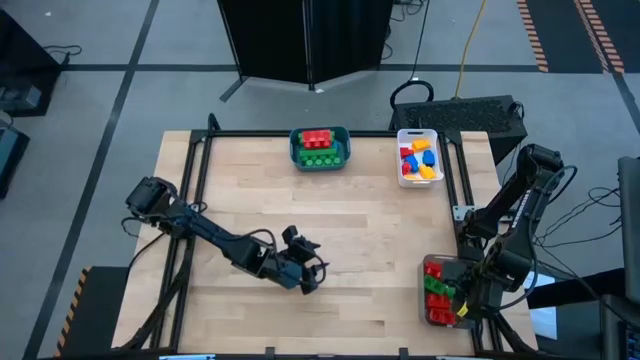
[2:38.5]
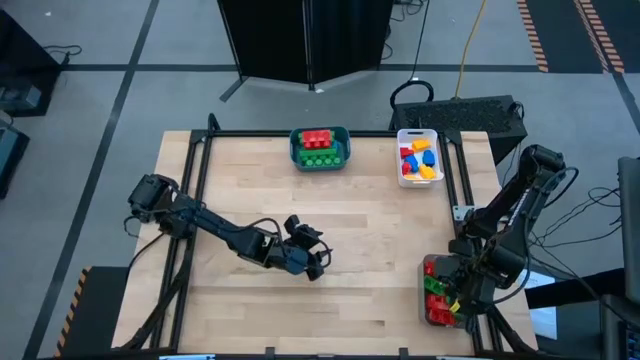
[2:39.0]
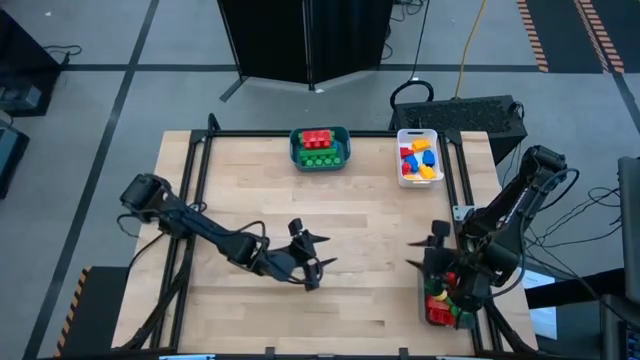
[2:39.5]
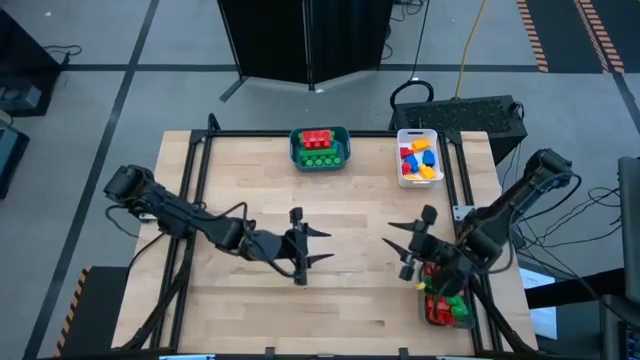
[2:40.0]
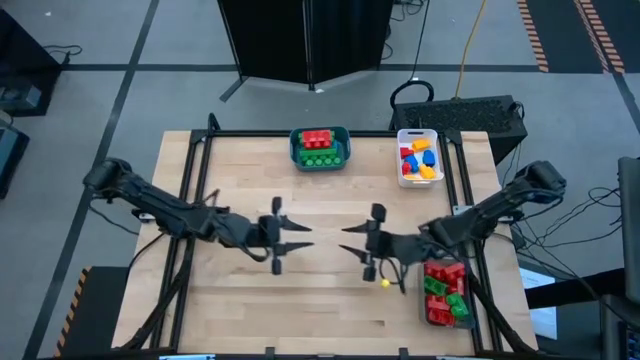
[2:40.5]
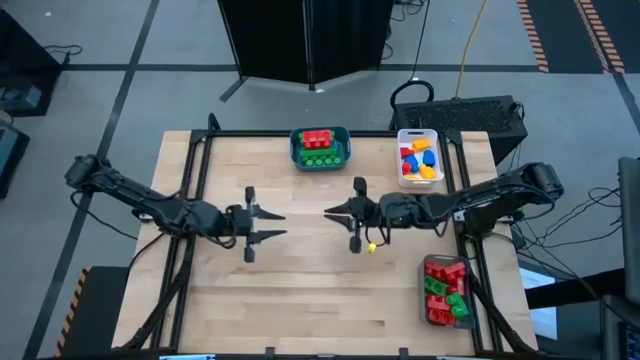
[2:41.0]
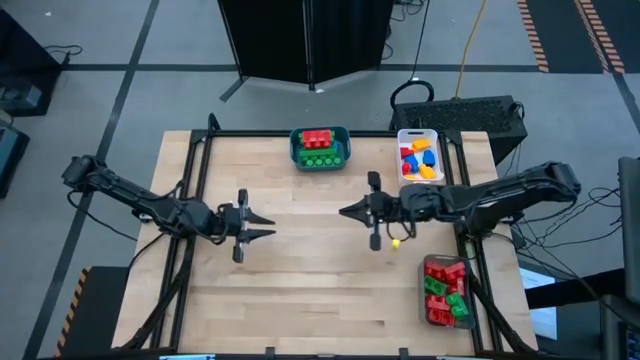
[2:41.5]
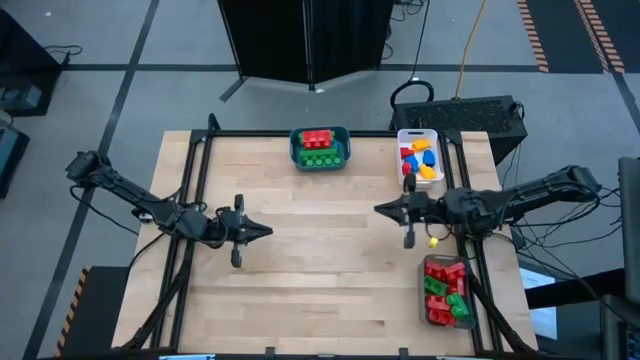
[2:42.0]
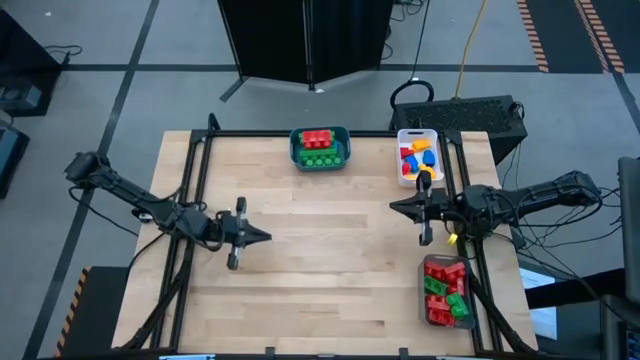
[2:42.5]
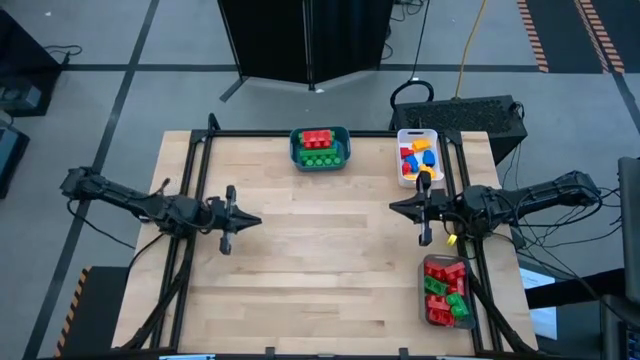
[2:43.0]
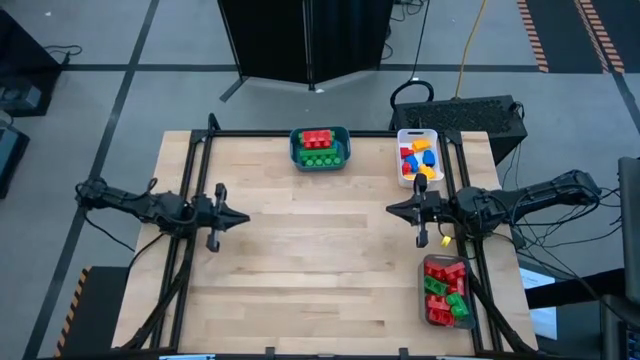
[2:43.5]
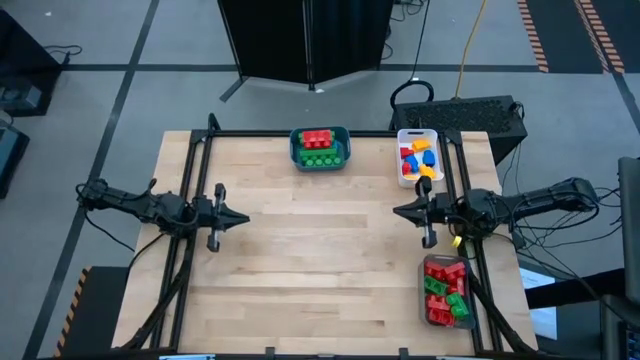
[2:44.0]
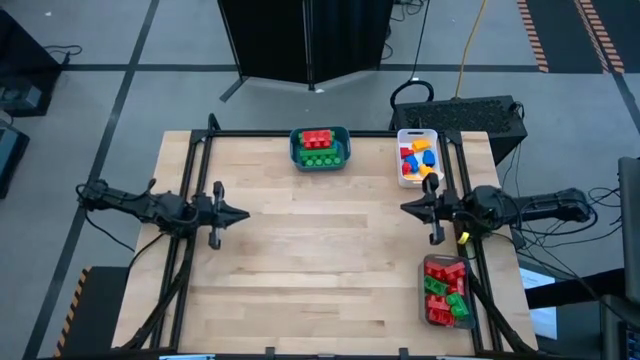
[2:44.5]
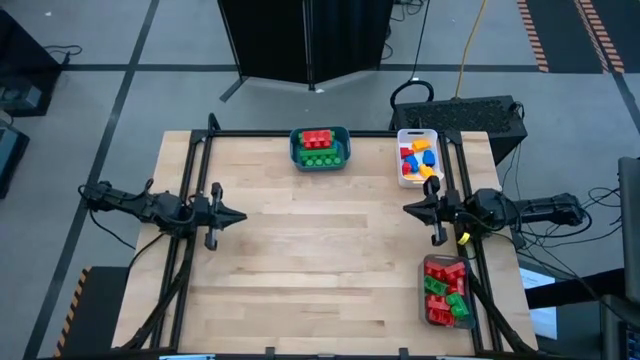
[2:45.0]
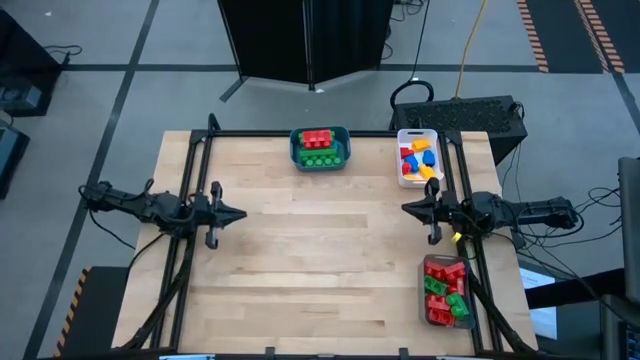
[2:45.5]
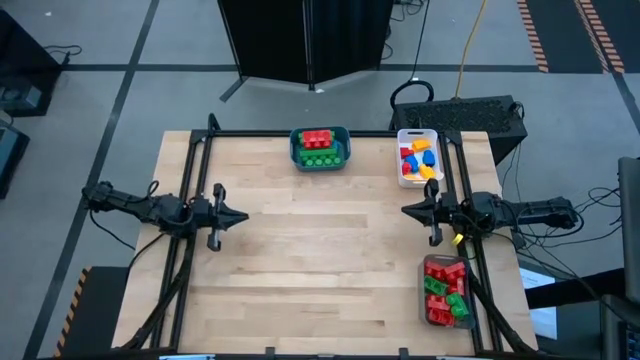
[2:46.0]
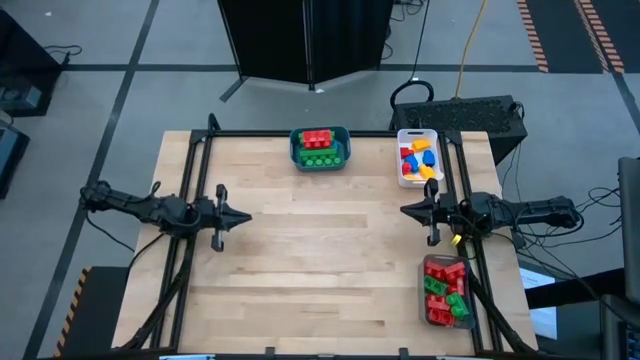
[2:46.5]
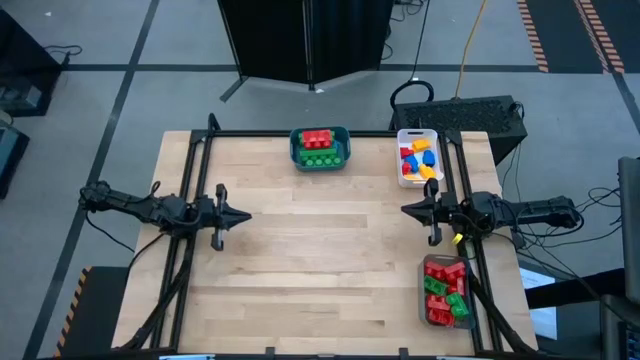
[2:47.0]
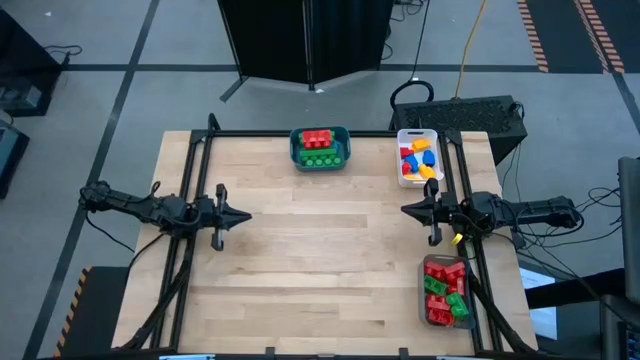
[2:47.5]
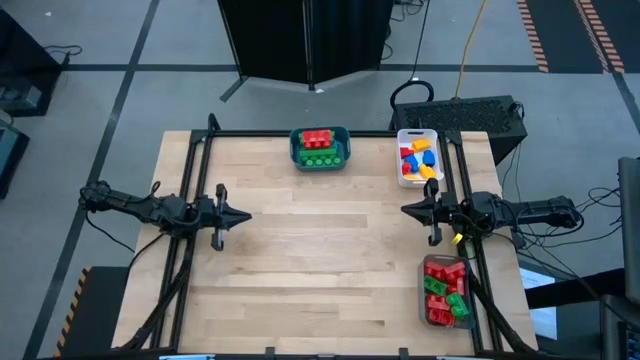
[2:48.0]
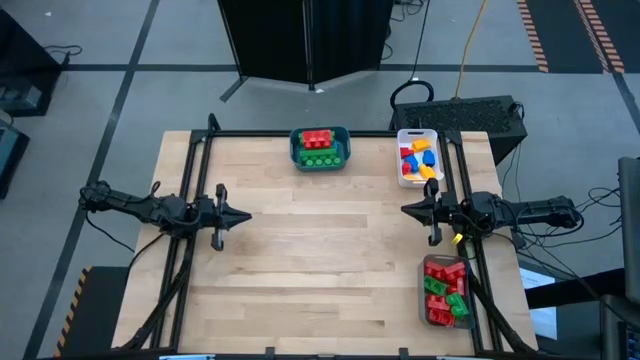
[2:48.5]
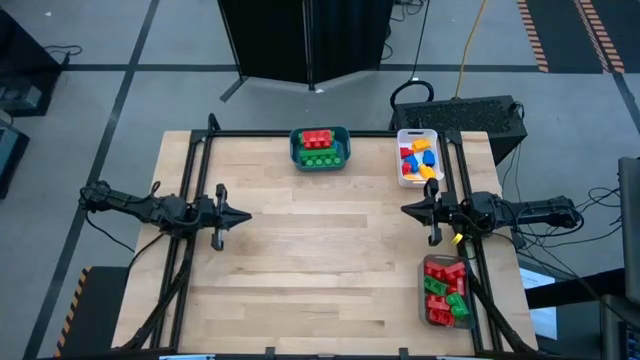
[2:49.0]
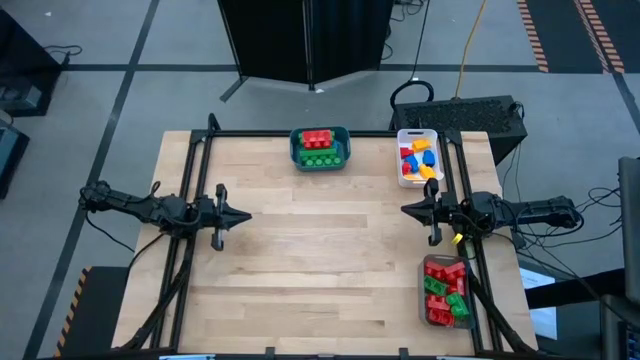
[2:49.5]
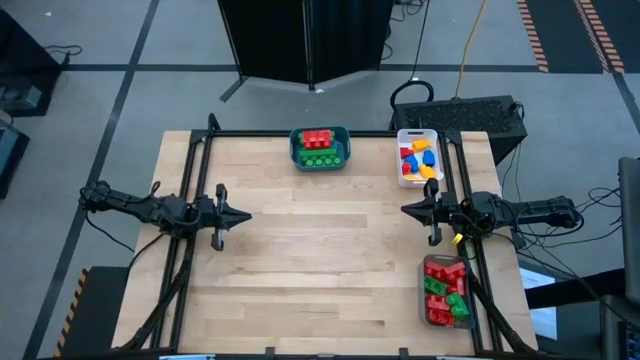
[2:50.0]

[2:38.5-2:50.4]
Task: Sort blocks by size
Return to Home Position

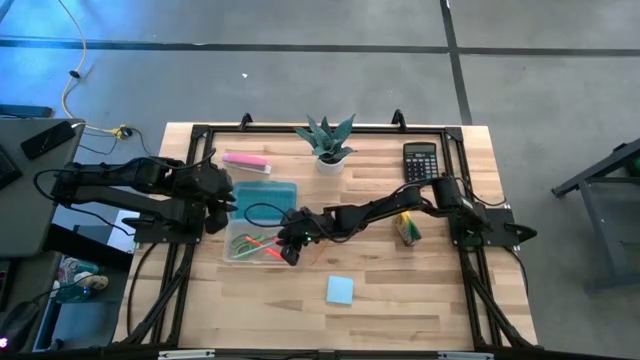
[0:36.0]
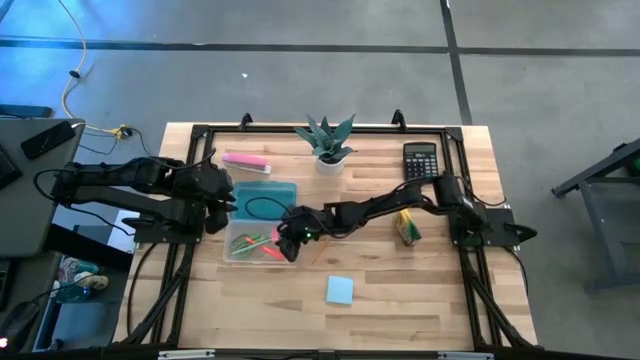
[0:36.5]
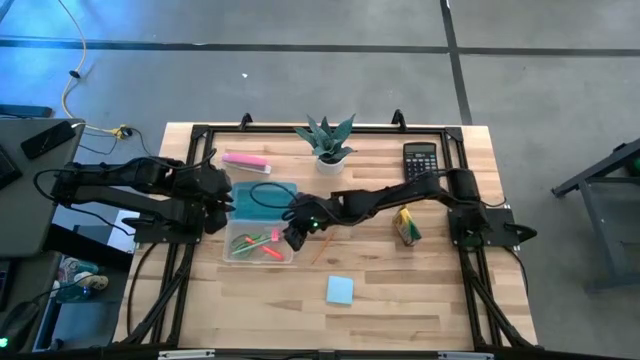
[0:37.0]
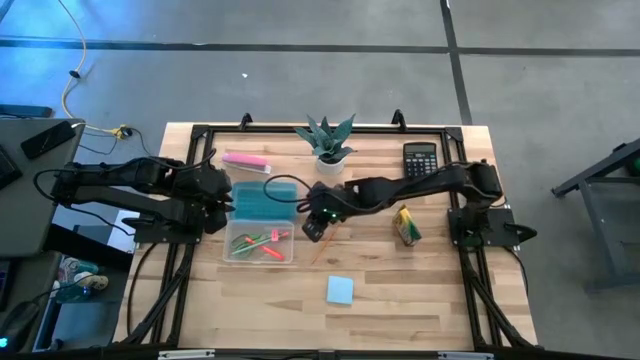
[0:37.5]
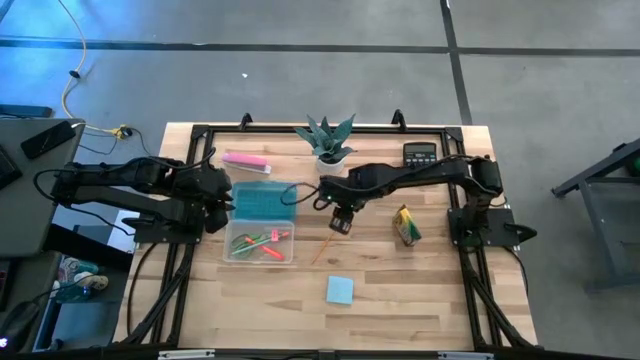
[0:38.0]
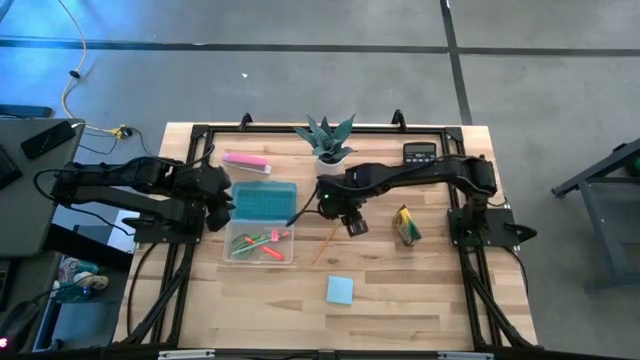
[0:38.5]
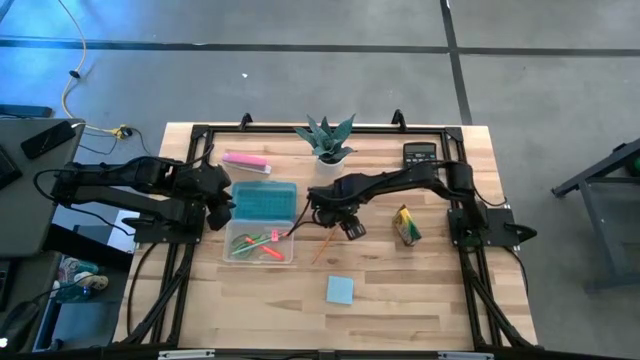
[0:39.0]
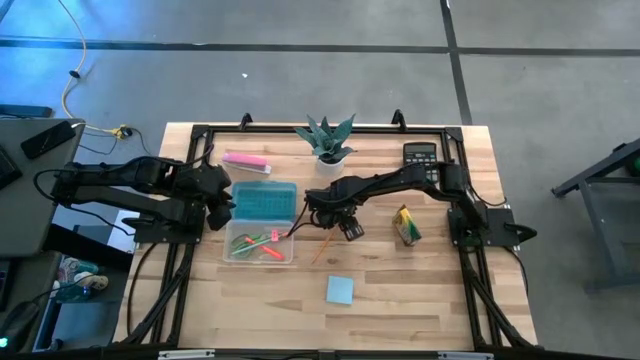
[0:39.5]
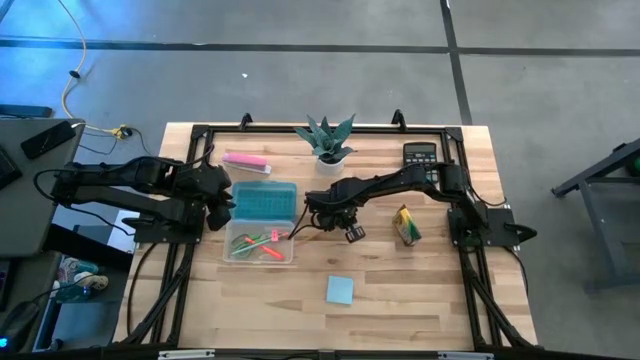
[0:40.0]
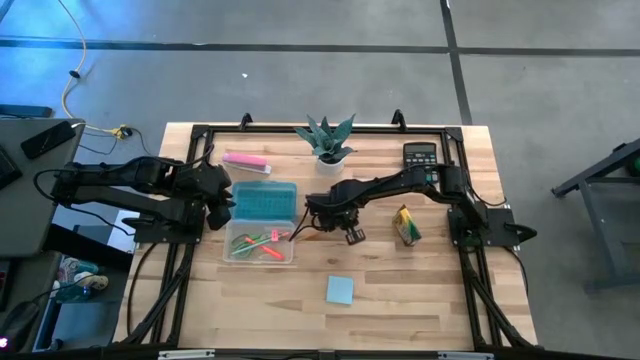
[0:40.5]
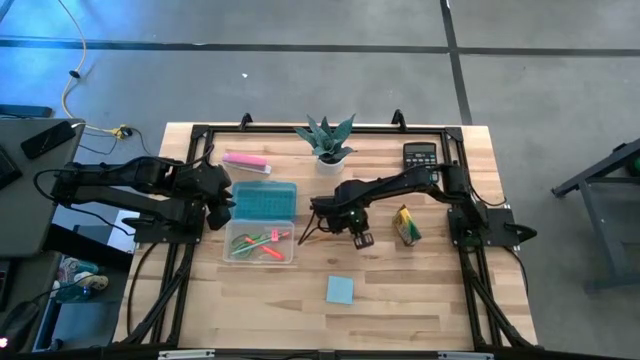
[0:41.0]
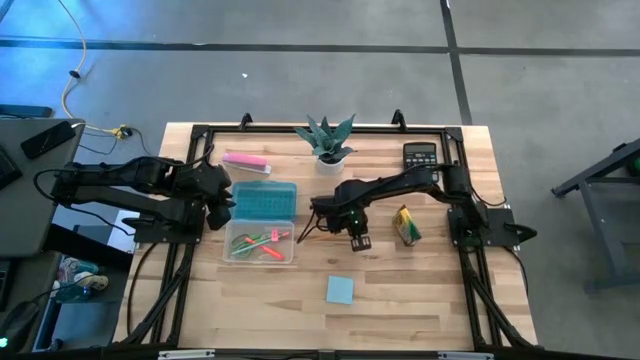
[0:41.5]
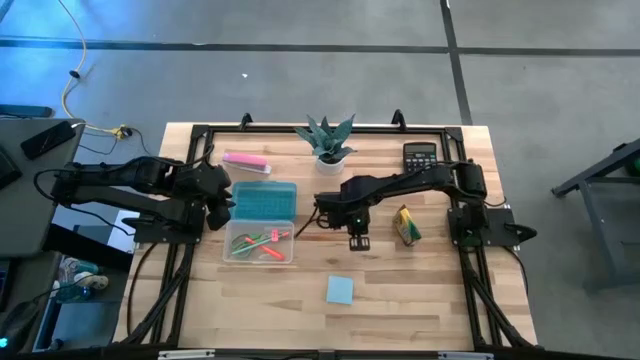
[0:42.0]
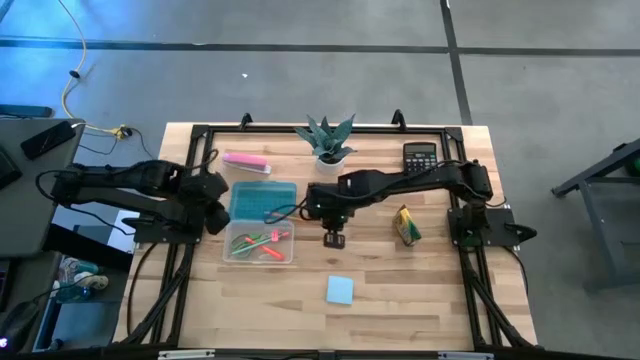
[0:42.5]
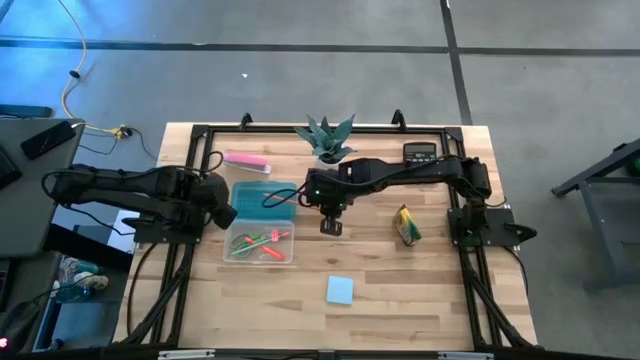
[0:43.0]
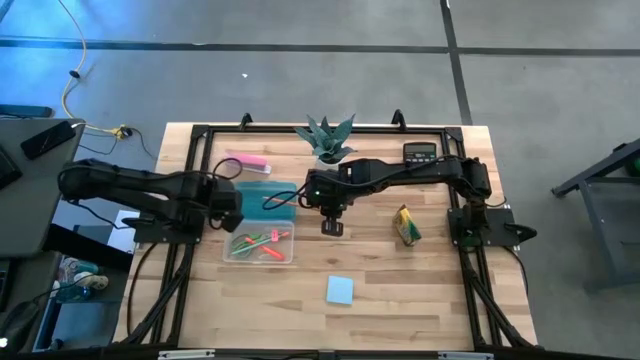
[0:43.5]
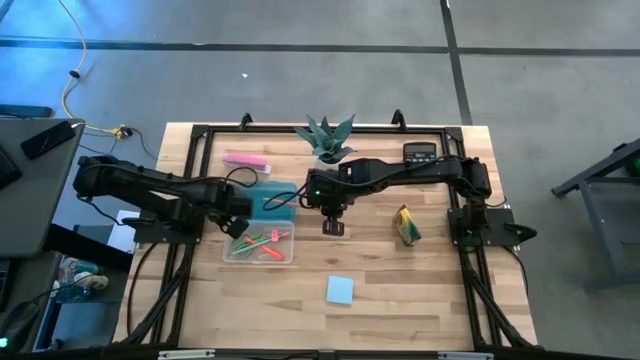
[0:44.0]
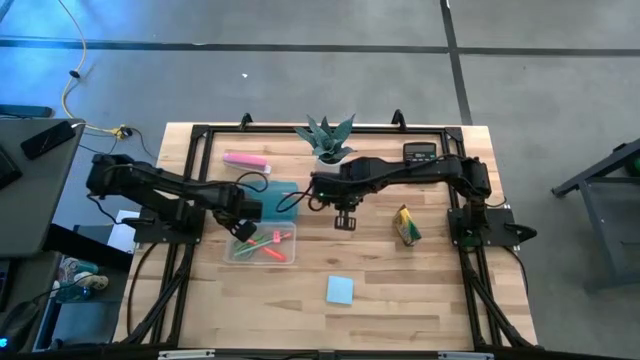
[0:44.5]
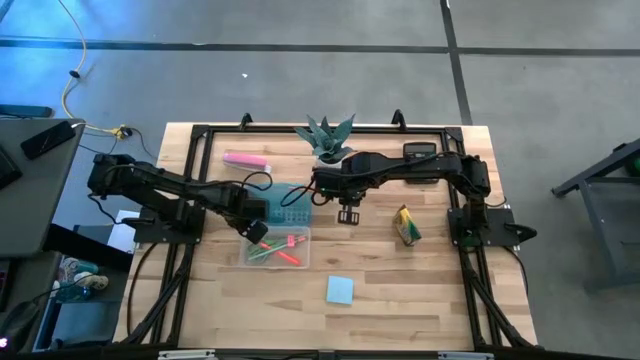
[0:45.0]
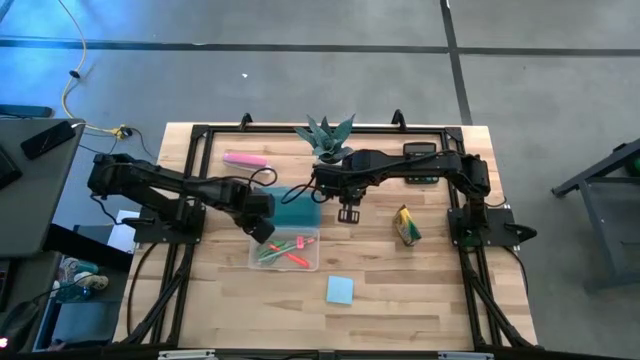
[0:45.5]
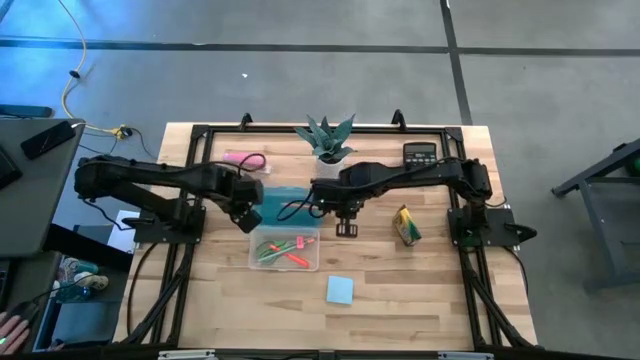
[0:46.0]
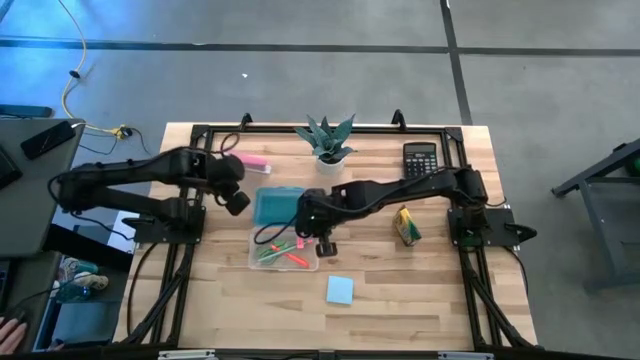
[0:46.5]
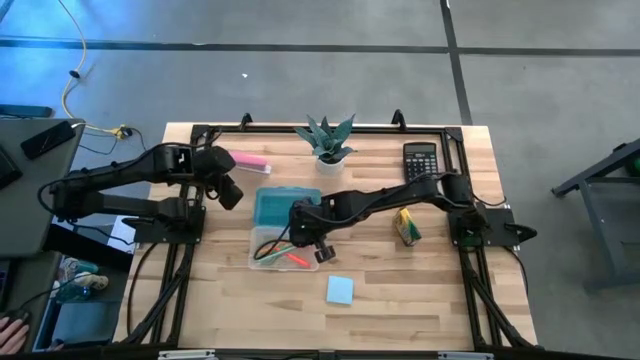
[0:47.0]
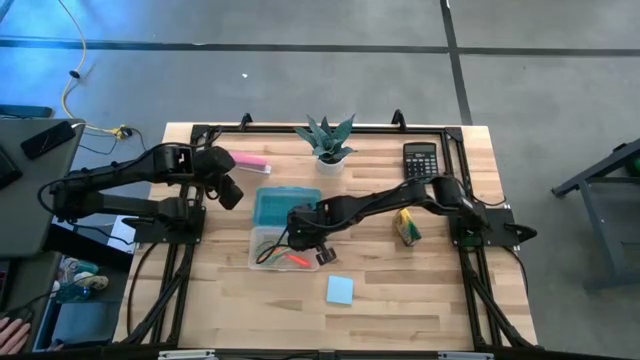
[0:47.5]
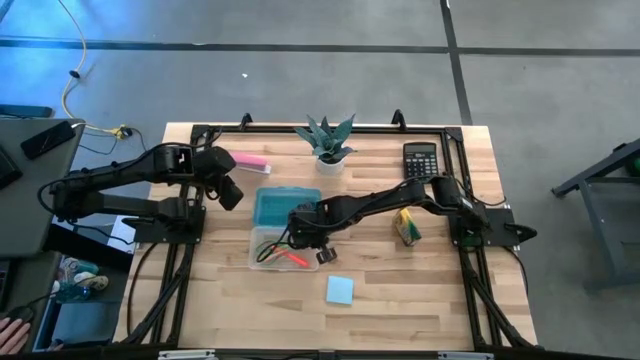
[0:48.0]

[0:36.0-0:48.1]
Task: Pack school essentials
Put the orange pencil into the blue supply box
